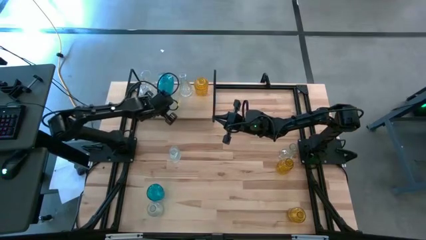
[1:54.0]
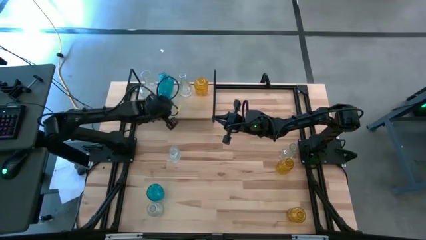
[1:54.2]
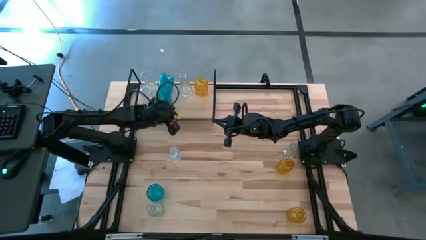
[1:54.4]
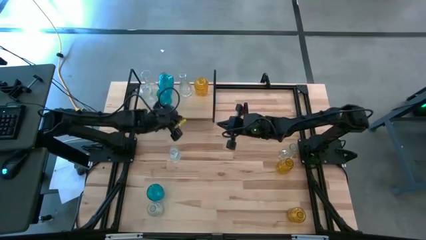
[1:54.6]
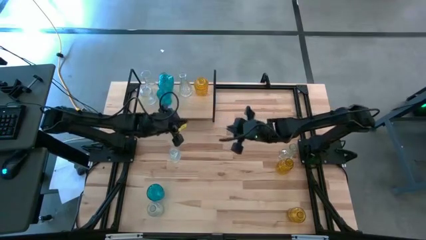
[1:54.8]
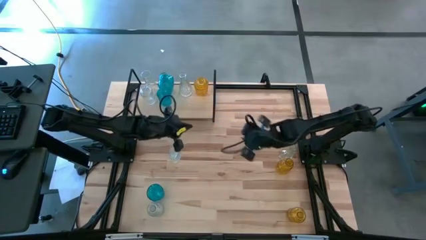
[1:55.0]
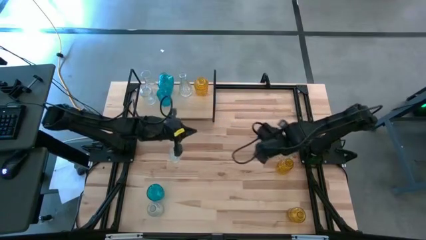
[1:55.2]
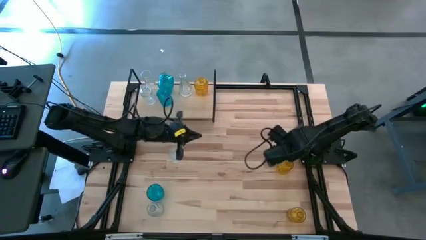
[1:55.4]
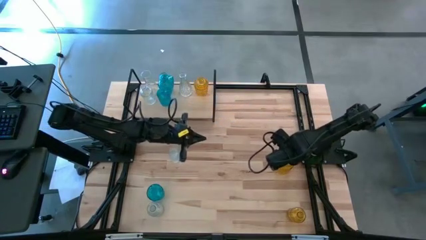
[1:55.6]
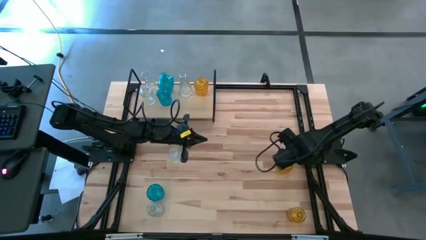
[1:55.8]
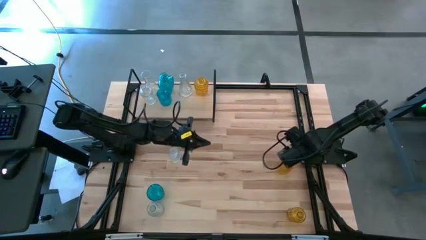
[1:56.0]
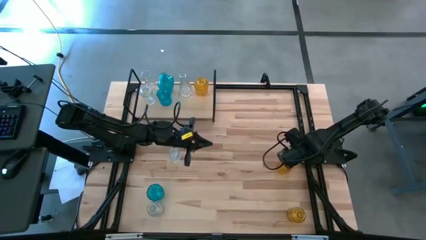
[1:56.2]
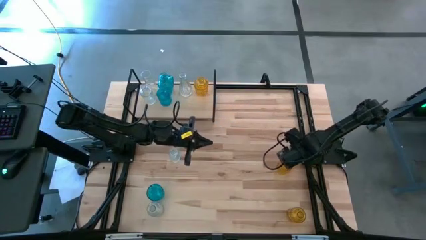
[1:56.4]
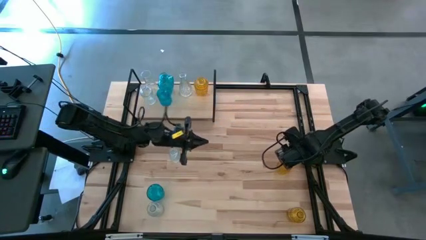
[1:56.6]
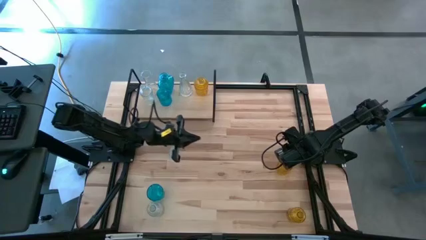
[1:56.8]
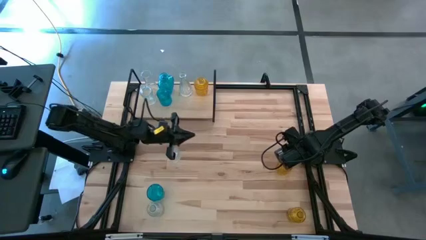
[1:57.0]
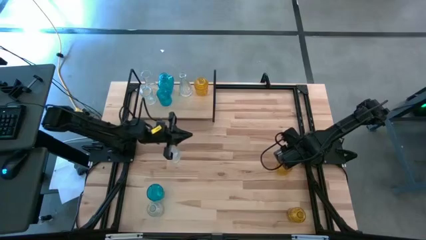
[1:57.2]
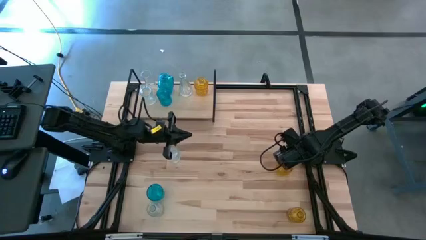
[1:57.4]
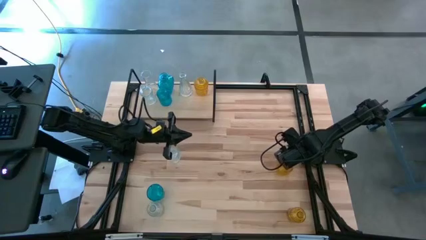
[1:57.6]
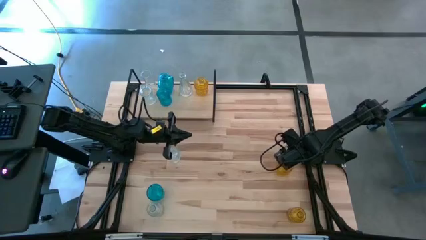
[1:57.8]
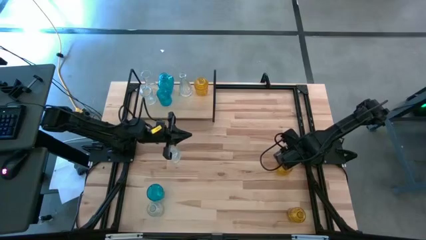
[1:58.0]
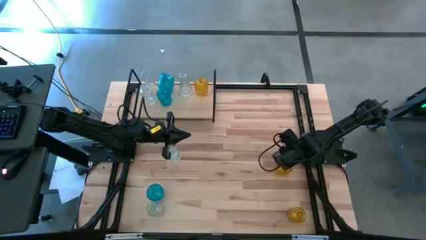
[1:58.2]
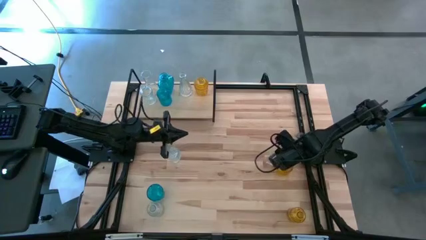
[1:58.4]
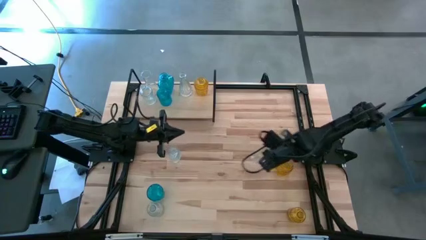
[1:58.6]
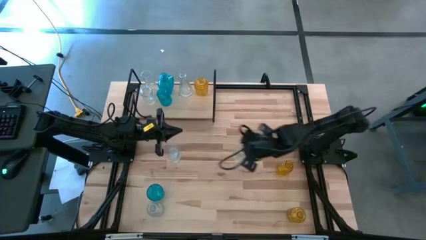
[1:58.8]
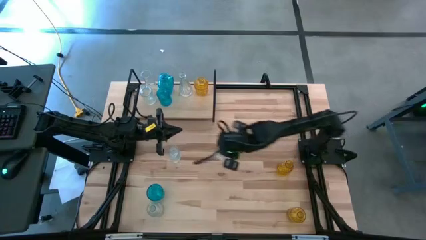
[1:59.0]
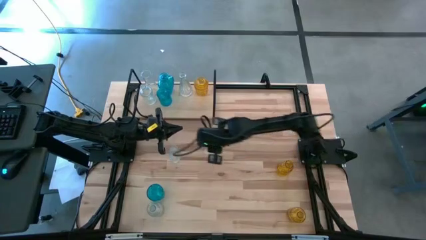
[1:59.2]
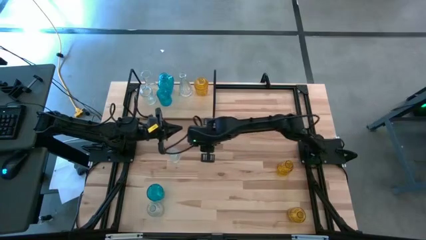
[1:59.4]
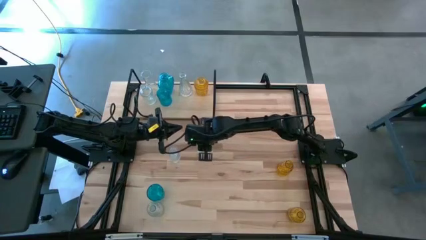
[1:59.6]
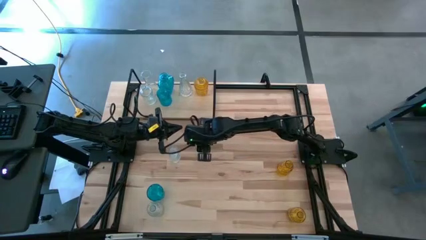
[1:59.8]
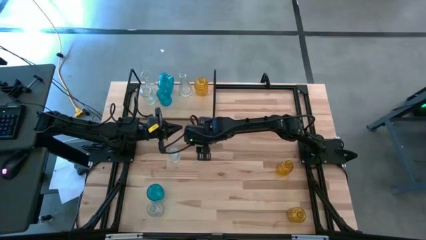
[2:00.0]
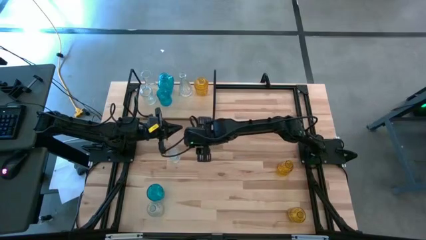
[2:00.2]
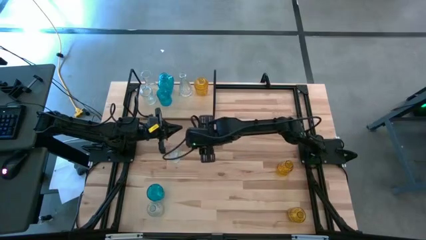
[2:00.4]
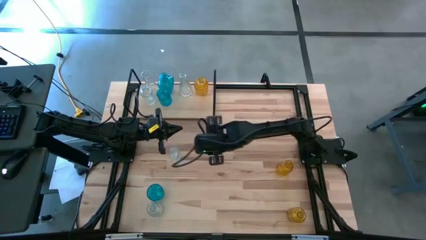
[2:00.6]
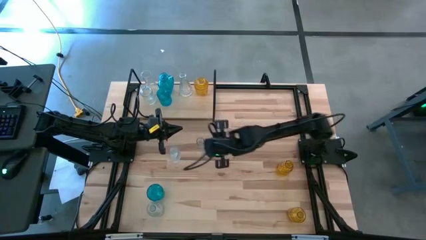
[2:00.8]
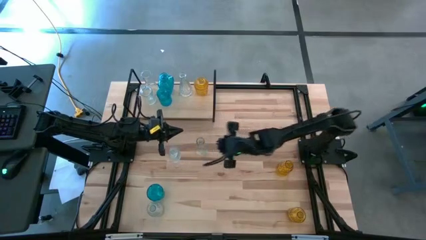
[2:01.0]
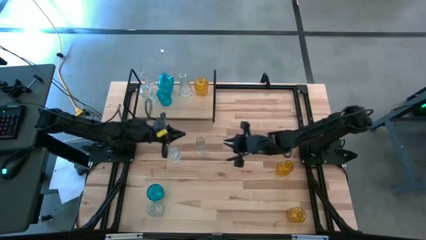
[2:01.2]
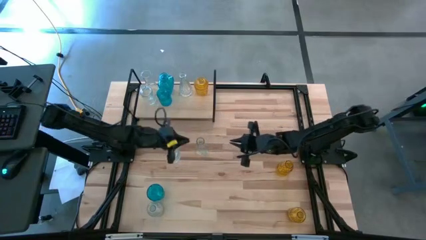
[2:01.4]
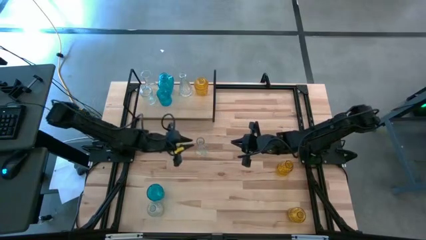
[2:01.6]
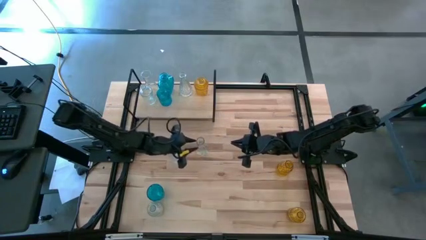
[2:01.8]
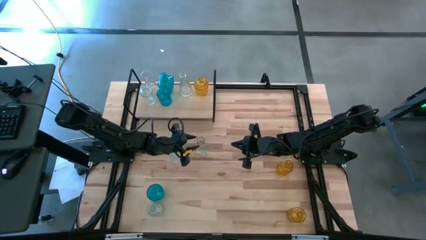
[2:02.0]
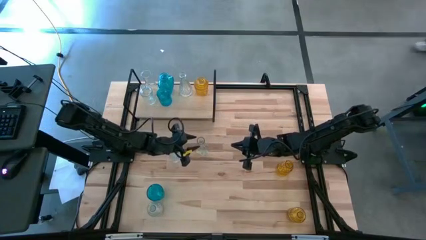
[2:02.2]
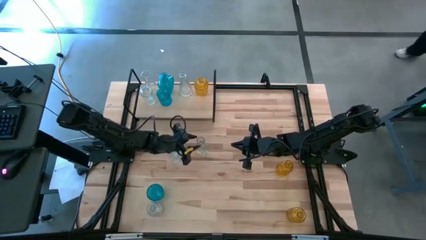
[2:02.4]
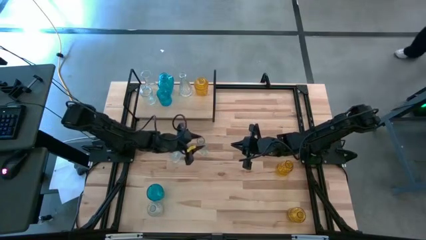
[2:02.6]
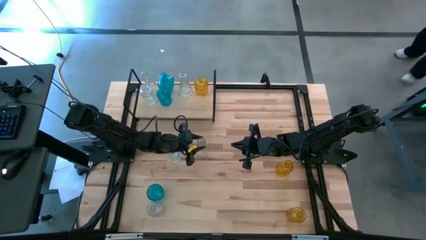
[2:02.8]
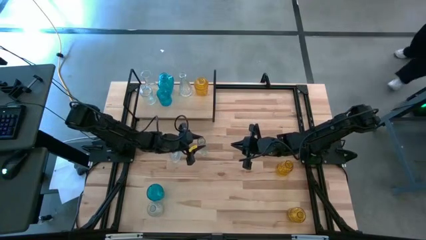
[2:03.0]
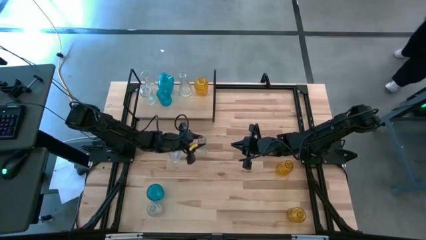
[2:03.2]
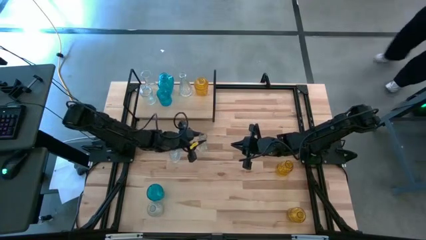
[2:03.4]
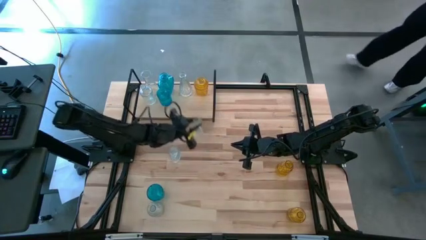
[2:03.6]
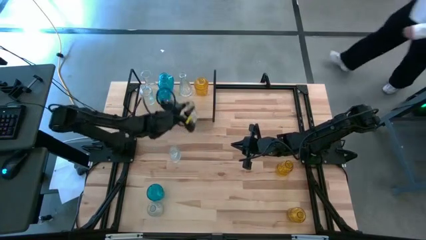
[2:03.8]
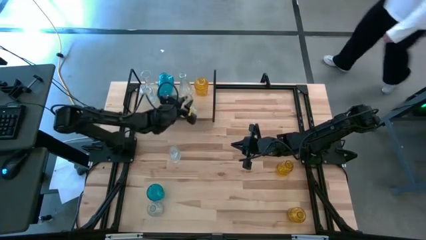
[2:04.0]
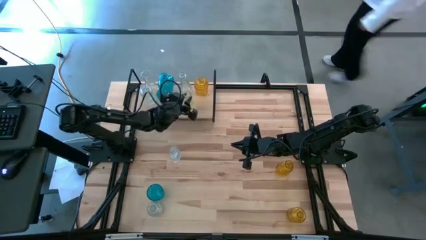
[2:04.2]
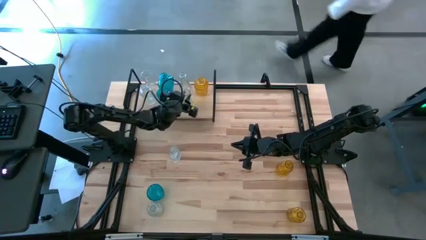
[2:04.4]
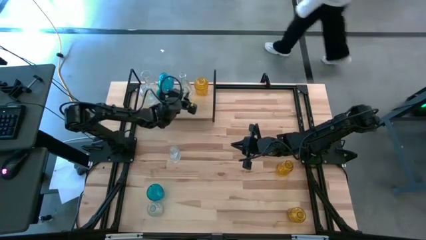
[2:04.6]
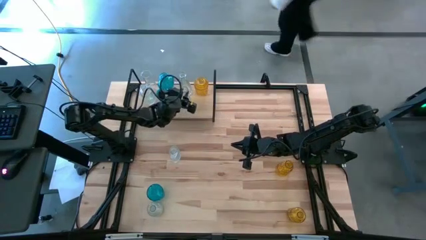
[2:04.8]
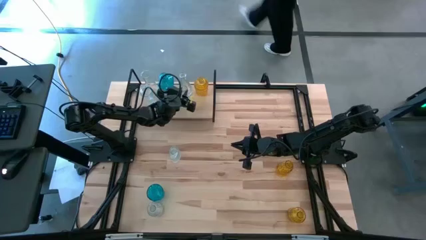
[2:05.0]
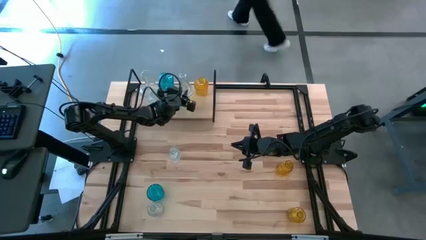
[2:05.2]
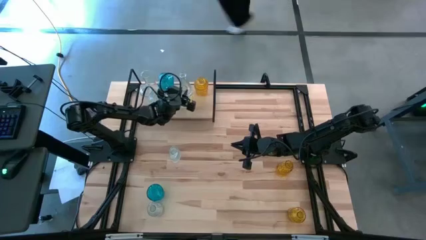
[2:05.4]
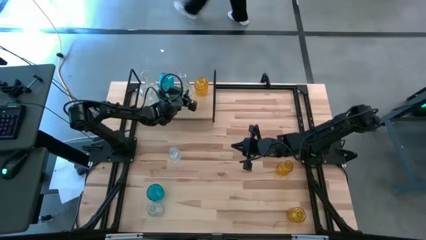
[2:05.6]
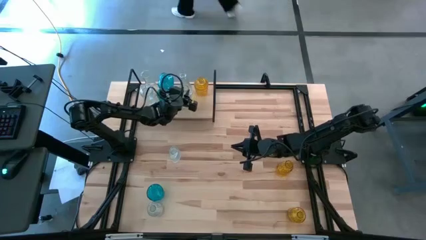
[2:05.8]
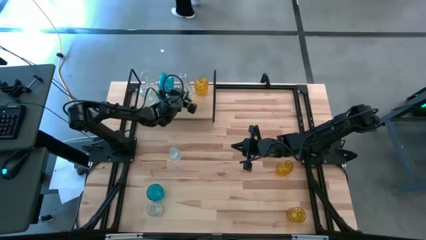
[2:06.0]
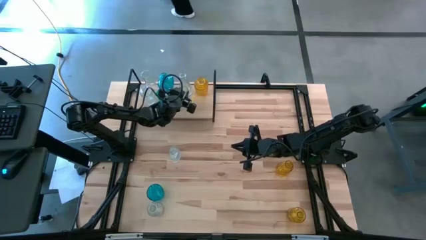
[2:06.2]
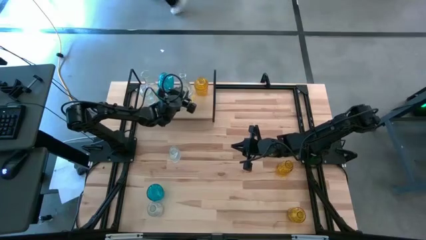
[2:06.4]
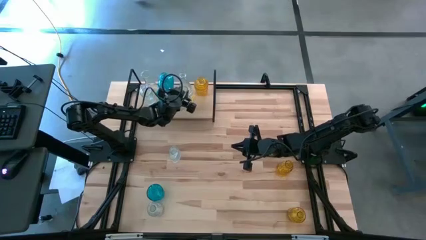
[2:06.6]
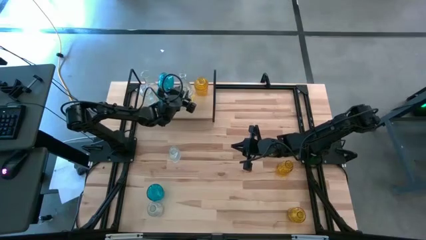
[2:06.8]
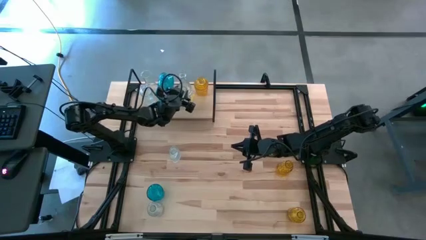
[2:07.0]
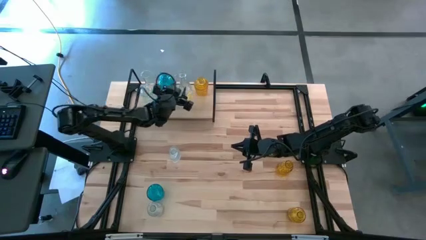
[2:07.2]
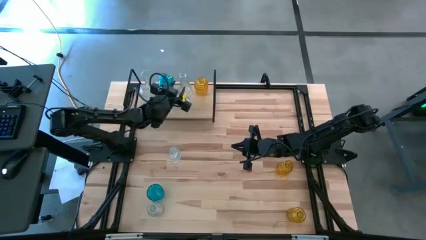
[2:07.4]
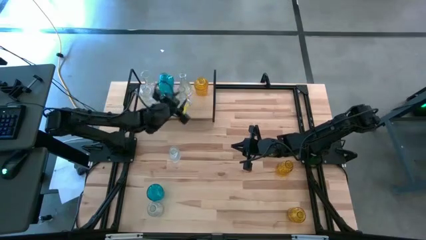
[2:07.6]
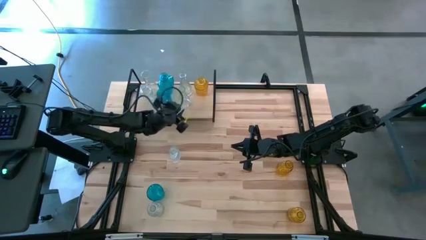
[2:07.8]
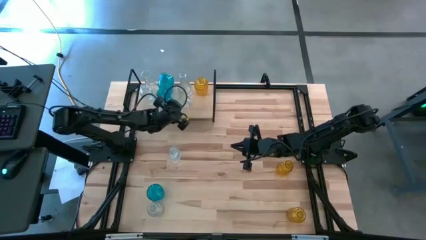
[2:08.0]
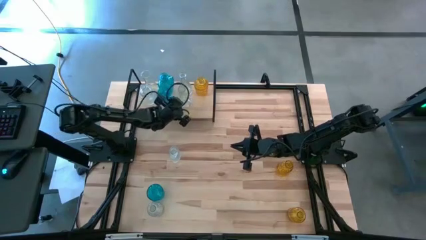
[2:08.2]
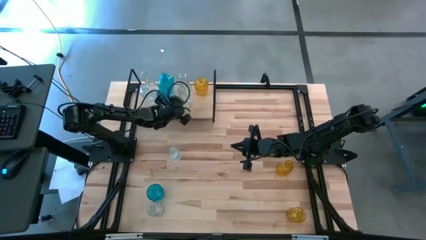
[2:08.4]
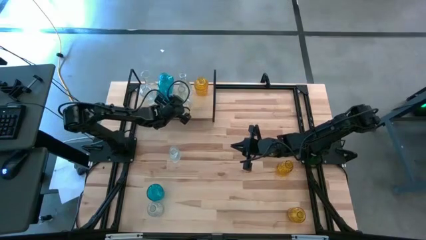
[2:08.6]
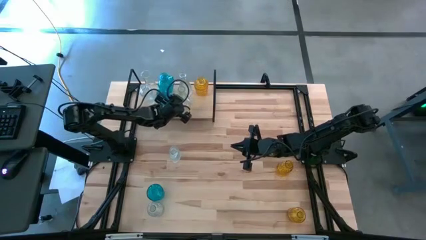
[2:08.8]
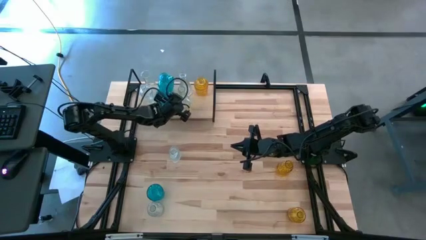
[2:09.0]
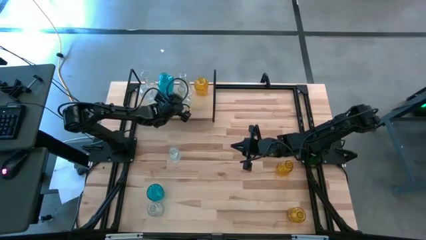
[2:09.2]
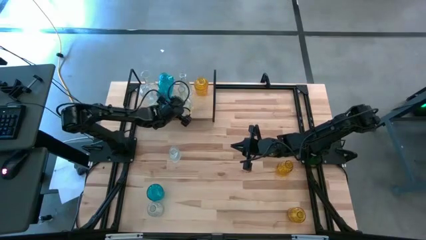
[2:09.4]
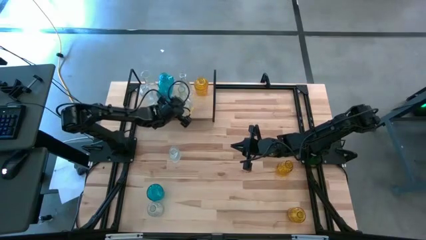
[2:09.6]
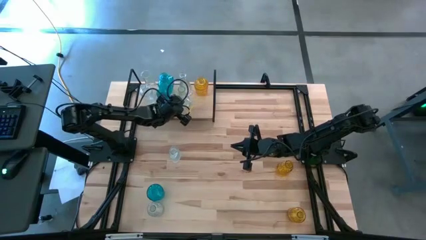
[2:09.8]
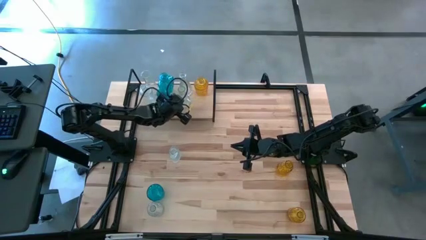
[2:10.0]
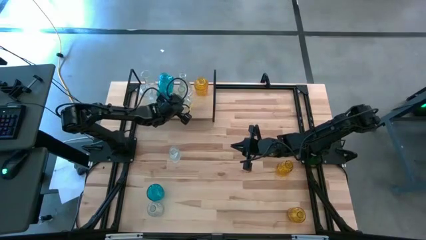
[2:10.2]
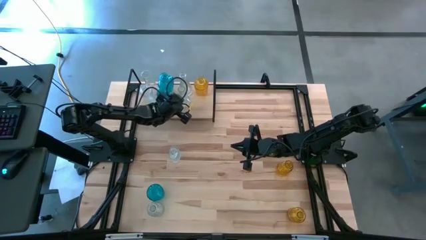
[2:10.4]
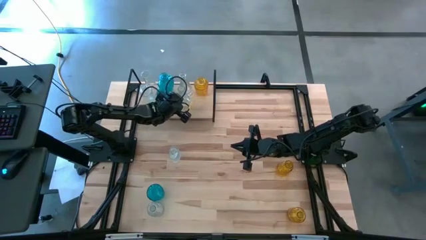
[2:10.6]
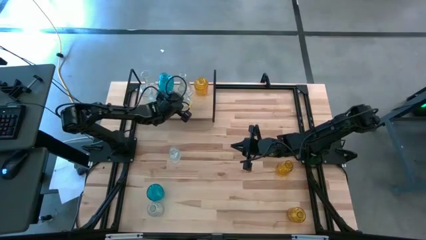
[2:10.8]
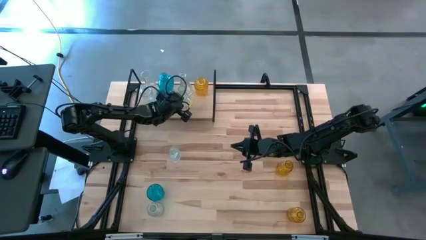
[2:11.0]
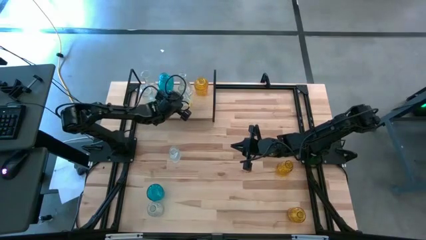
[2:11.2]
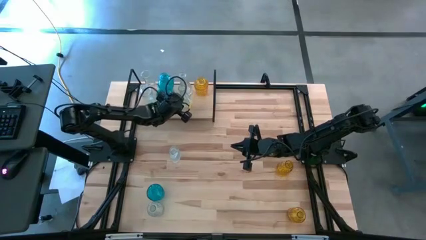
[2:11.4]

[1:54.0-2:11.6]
Task: sort vases onto shelf
Put the transparent vase on the shelf aligned with the other transparent vase
